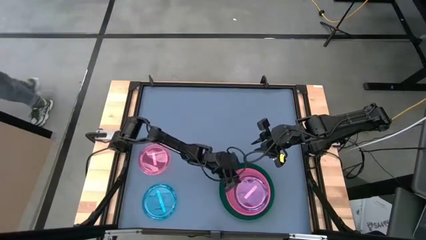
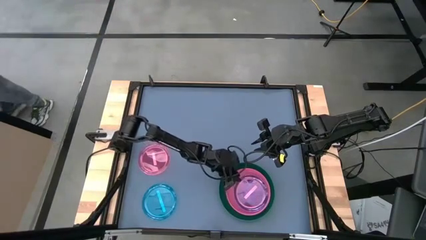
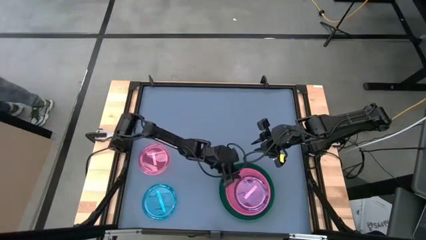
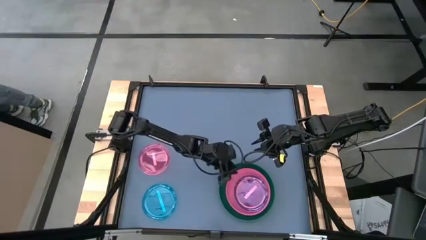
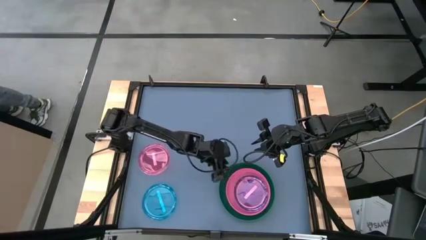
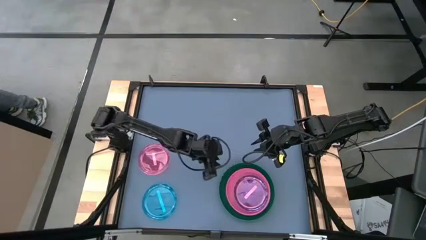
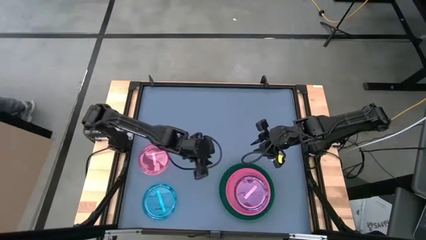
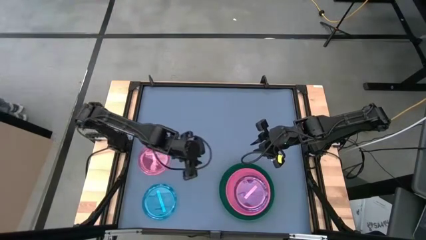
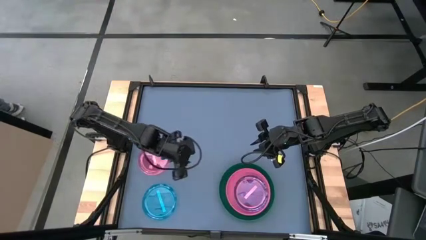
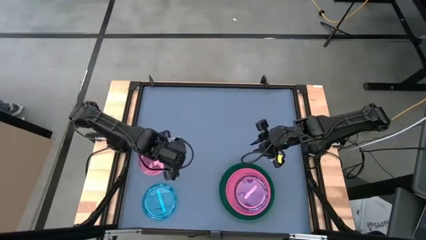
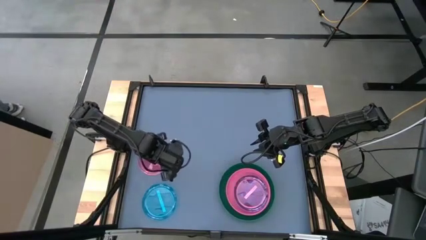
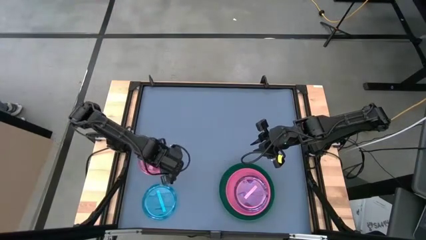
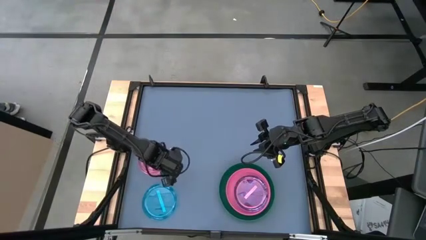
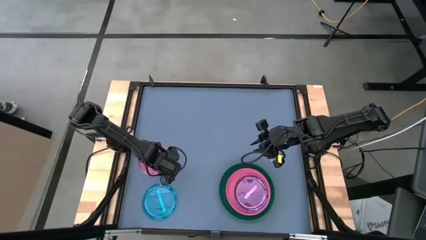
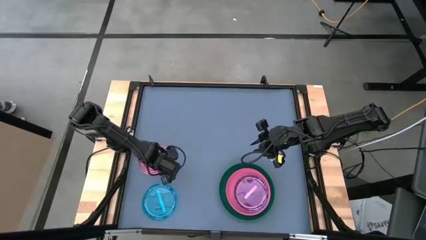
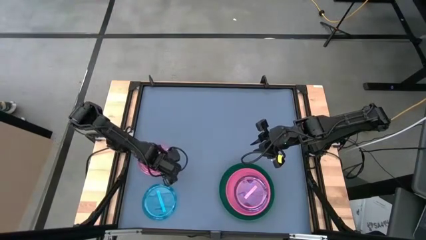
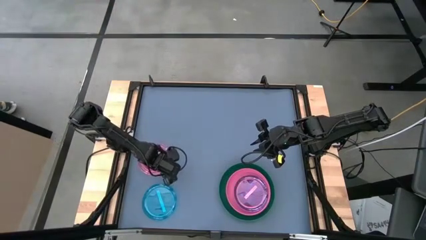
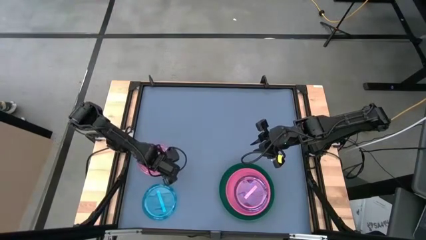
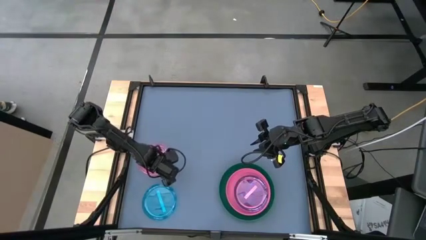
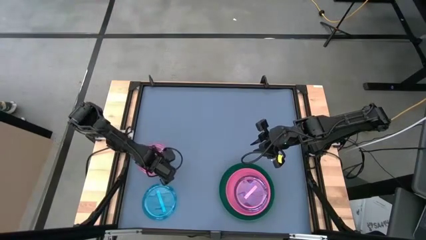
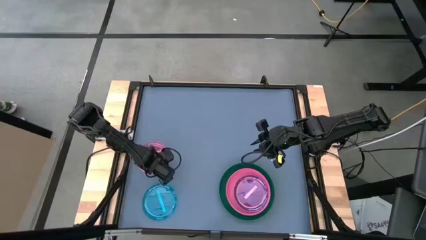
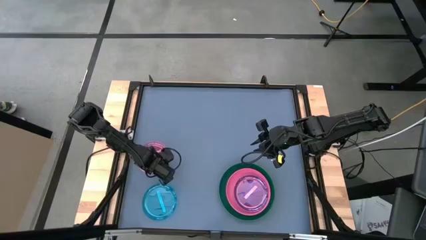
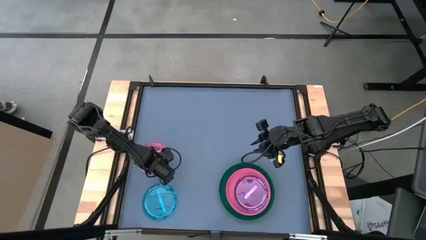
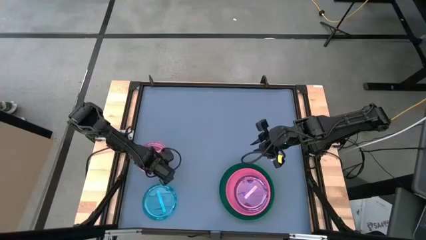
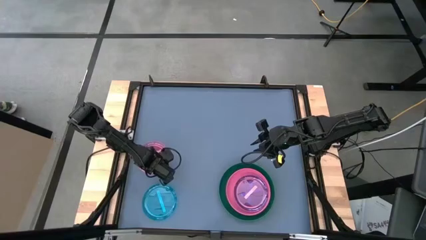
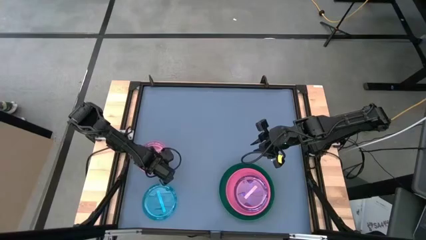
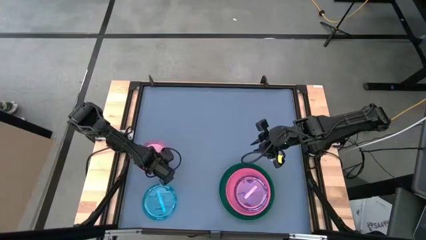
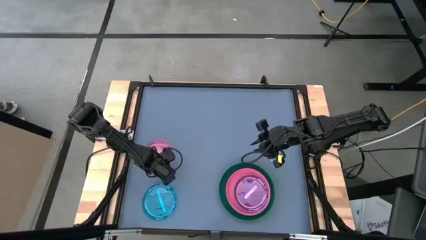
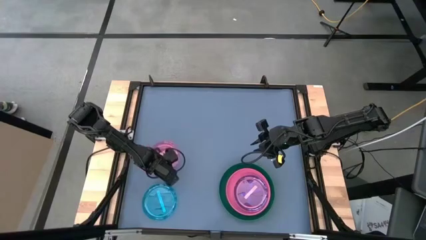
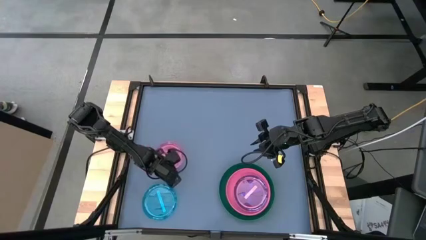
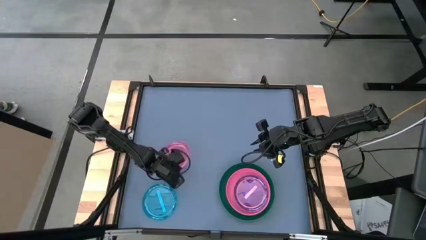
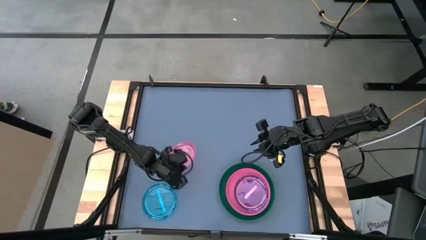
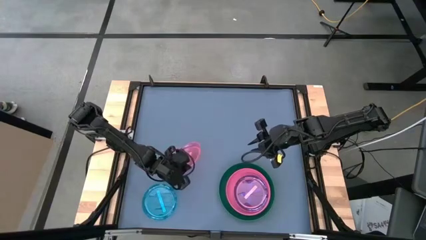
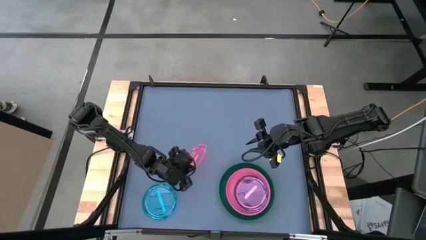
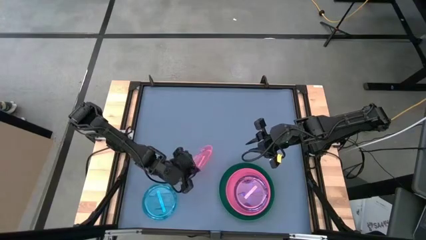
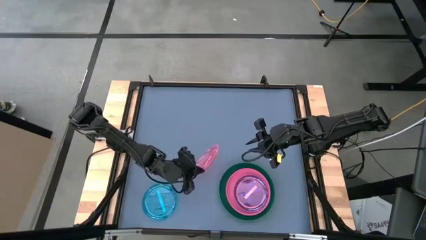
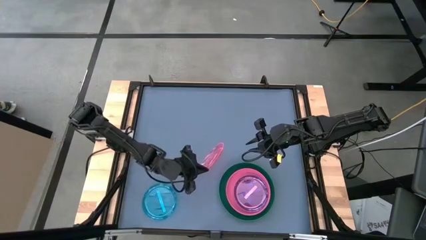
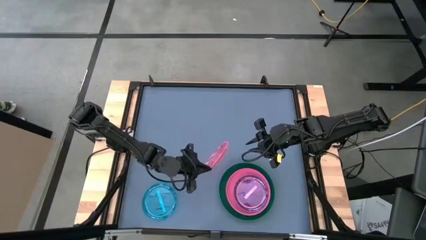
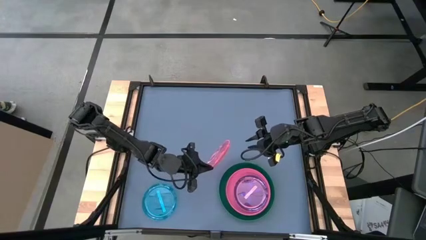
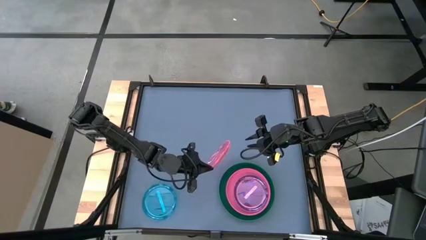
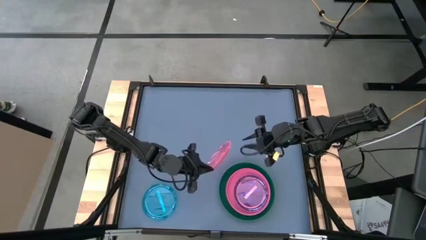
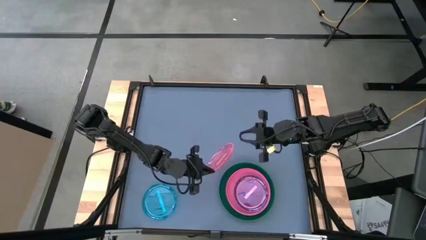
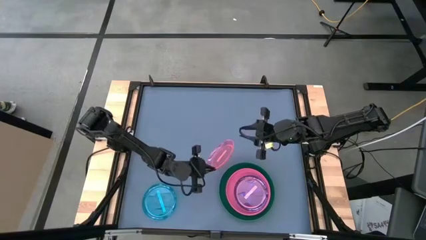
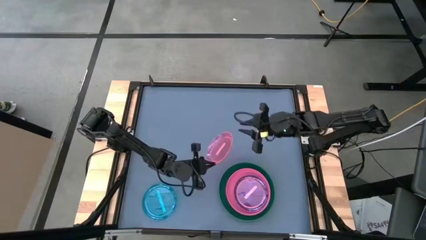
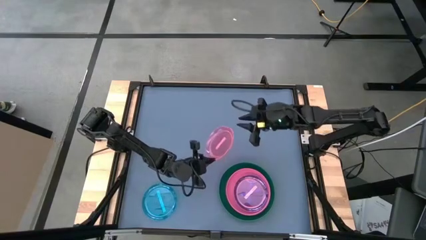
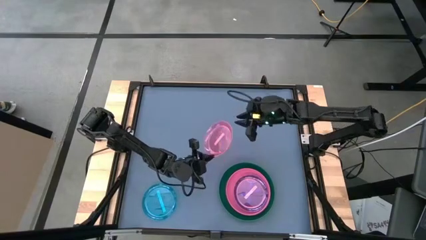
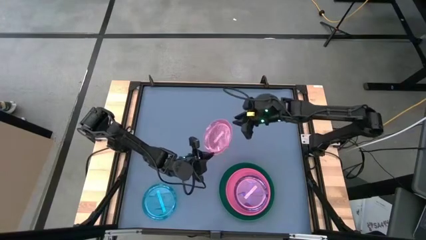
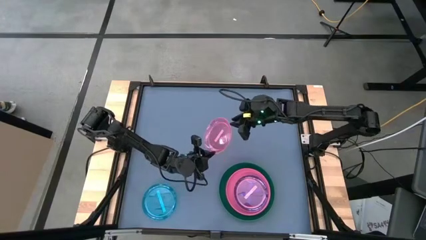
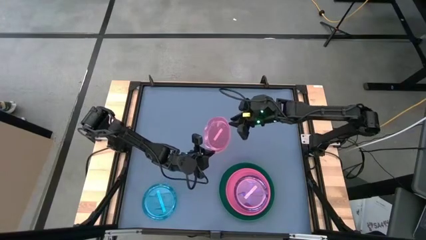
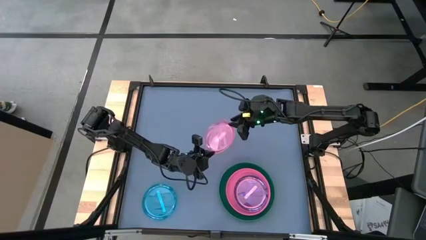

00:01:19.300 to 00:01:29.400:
Task: Stack plastic plates
Stack the light pink plate on top of the light pink plate

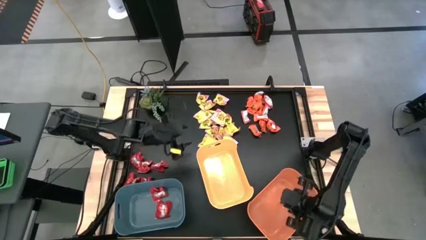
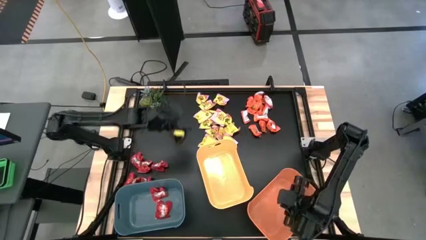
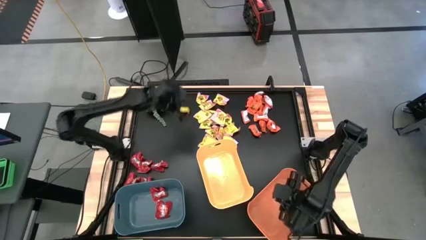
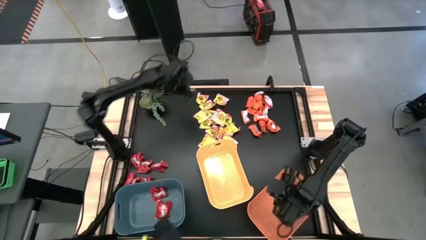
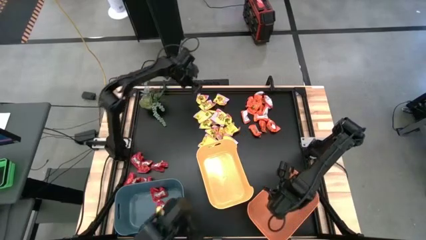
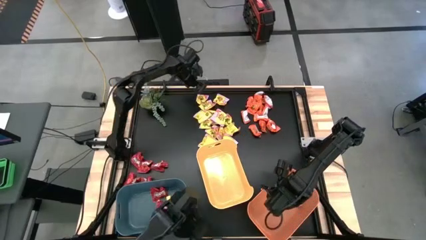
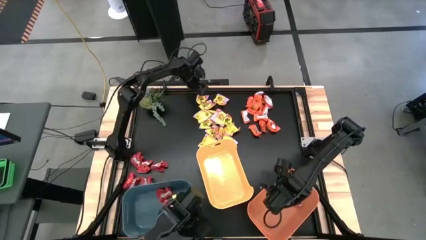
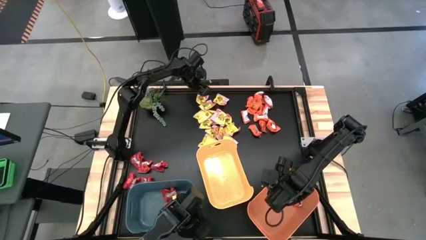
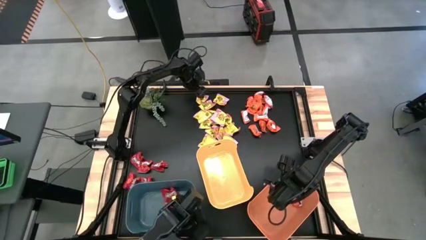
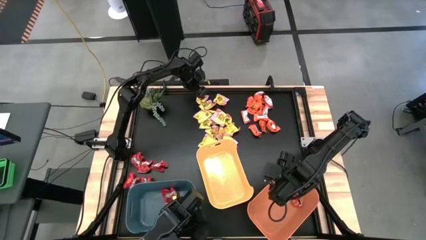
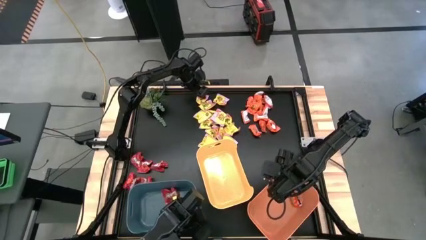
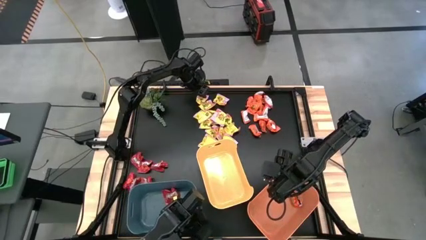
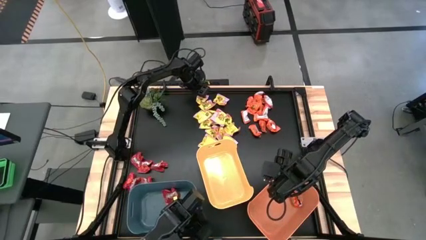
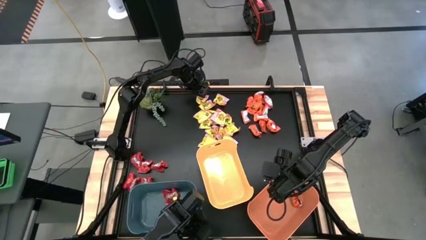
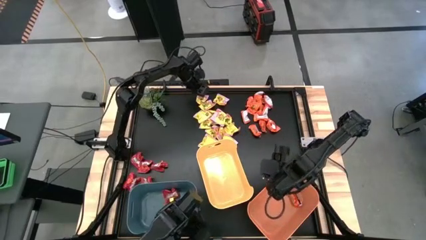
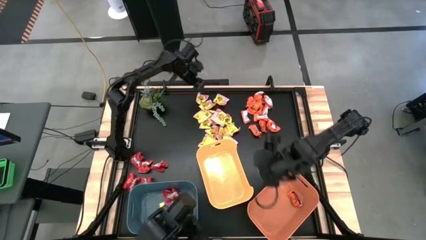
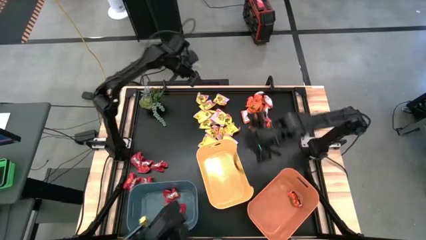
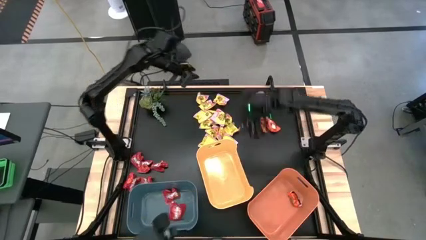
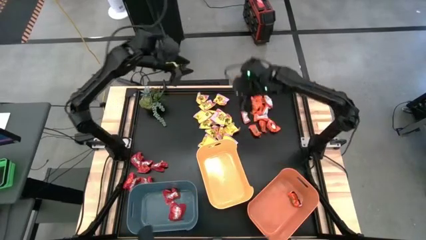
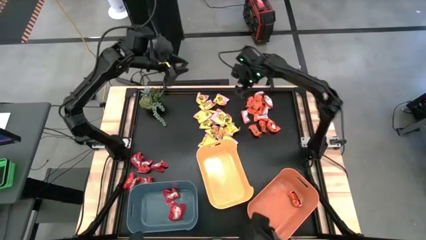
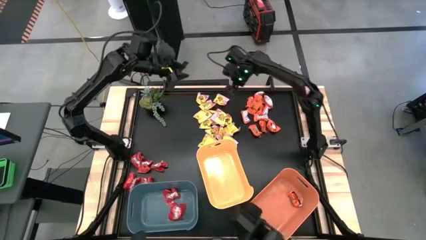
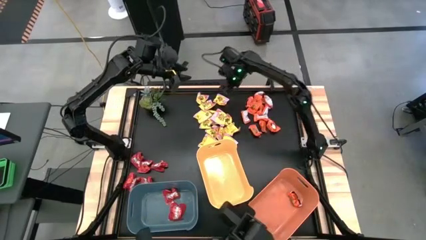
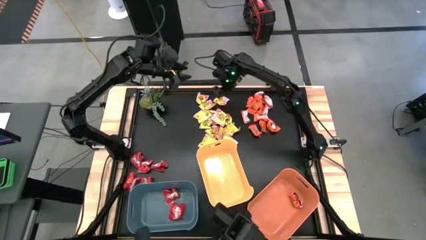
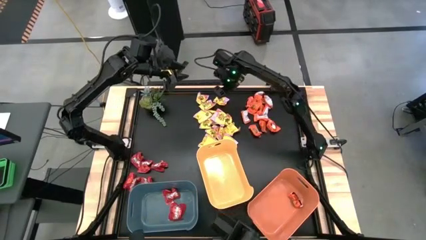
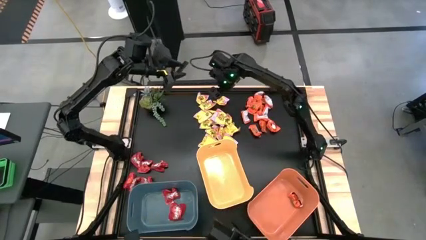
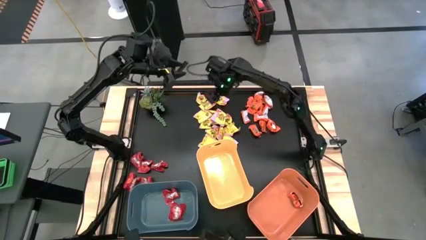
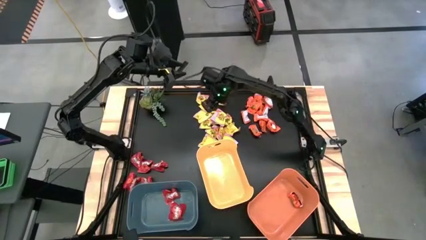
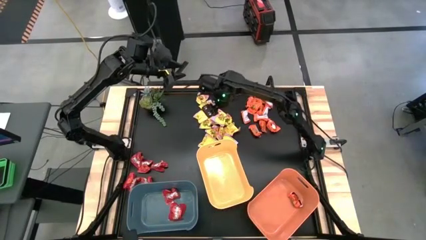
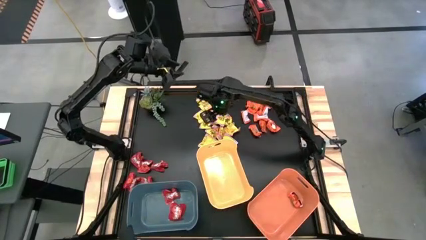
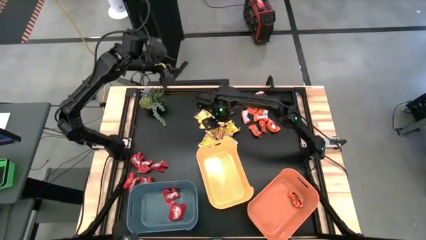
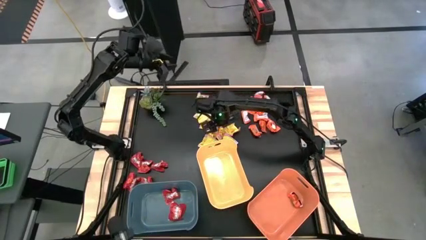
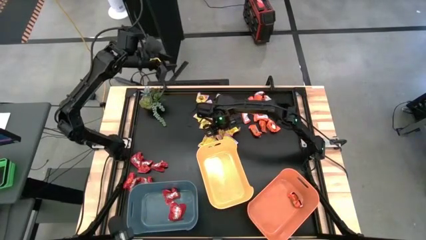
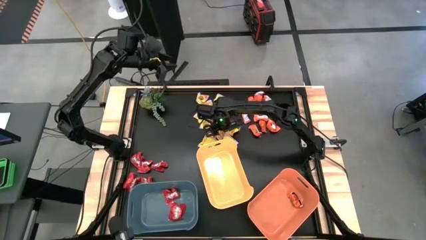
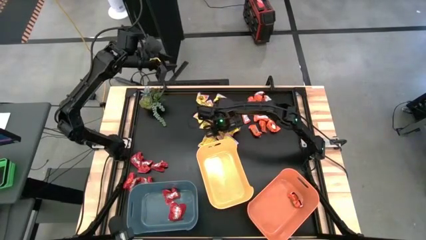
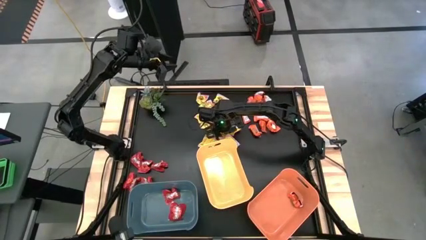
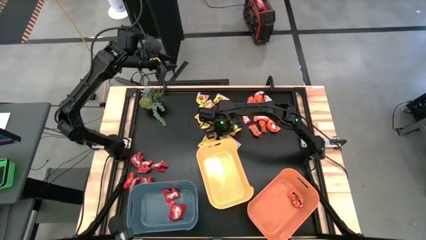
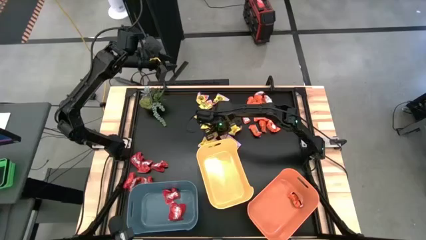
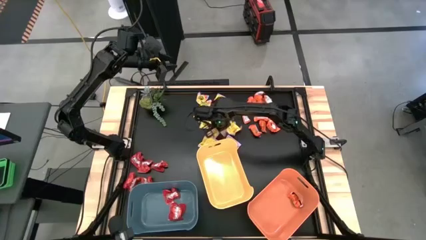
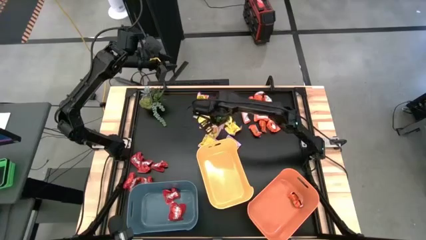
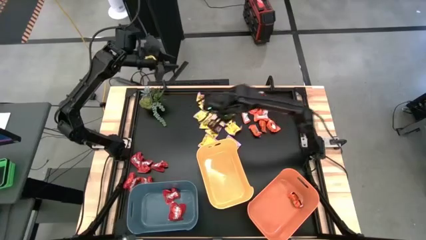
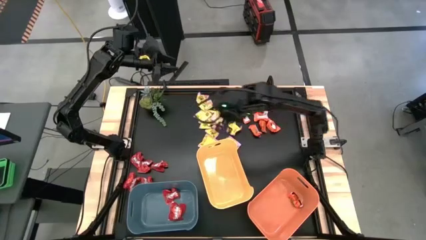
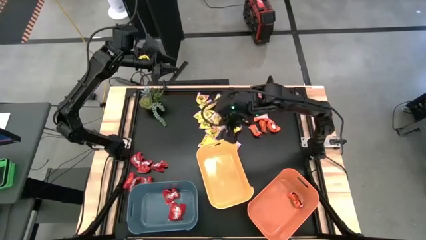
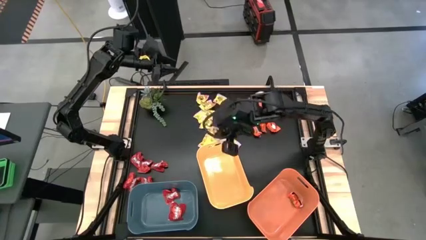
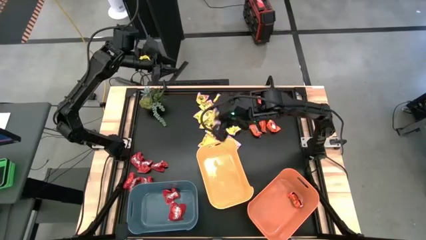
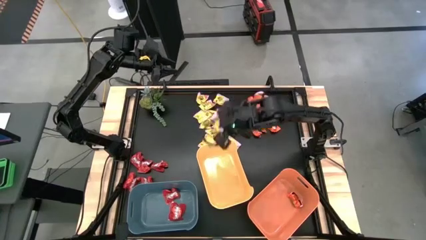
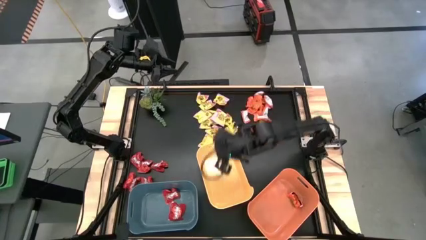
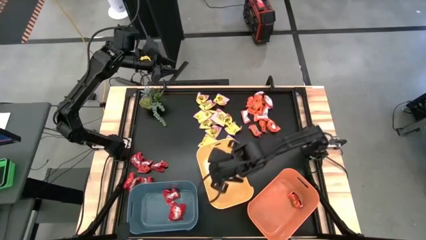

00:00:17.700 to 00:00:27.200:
Task: Sort candy
Put the yellow candy into the yellow bin
